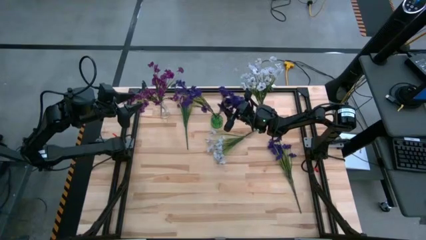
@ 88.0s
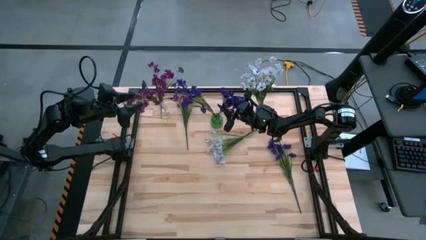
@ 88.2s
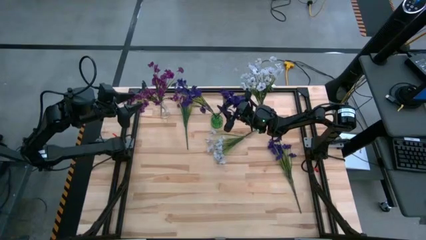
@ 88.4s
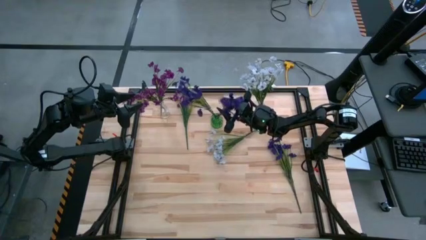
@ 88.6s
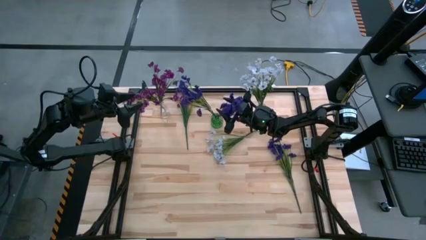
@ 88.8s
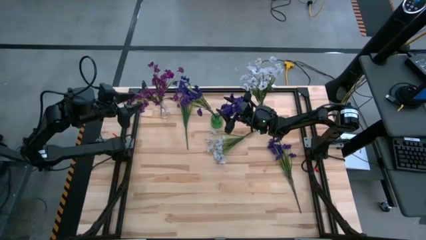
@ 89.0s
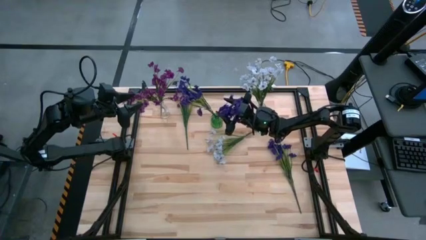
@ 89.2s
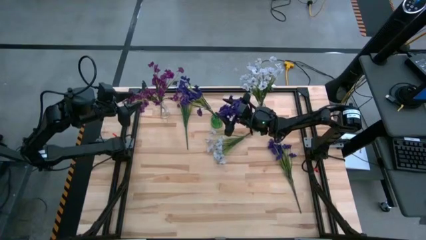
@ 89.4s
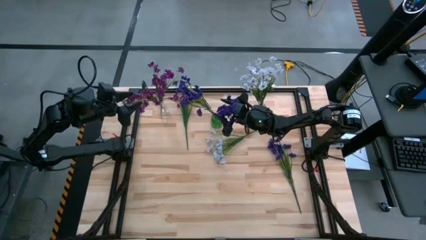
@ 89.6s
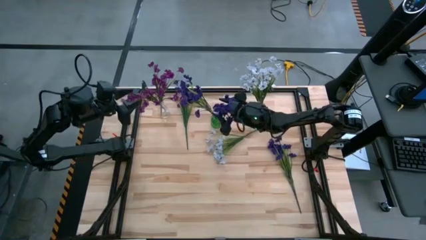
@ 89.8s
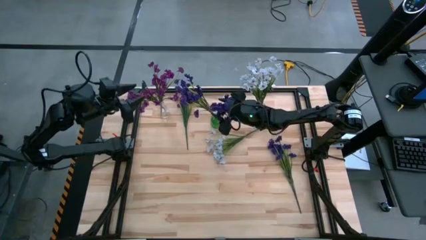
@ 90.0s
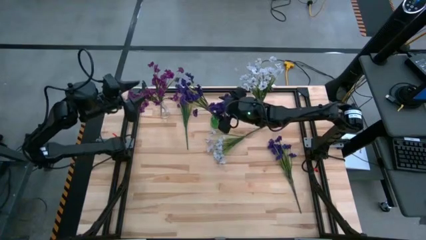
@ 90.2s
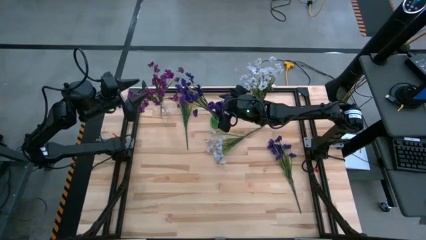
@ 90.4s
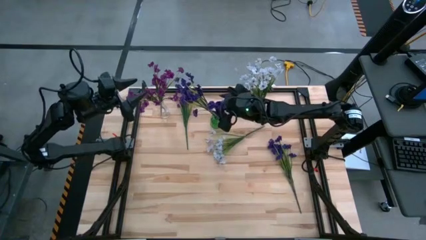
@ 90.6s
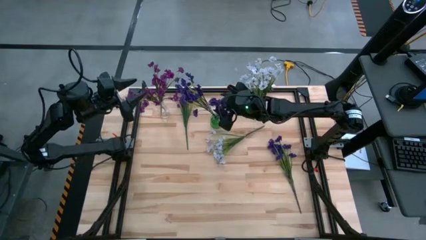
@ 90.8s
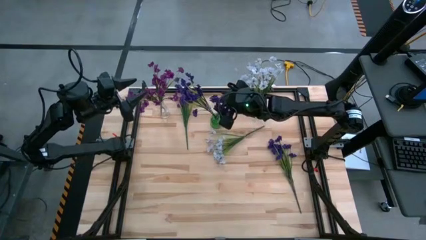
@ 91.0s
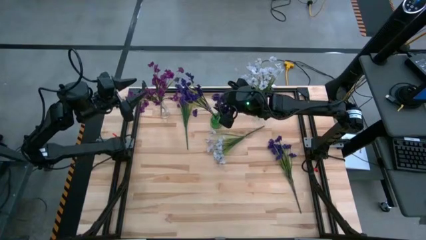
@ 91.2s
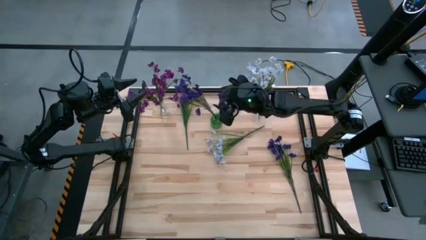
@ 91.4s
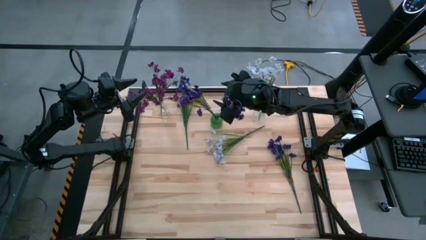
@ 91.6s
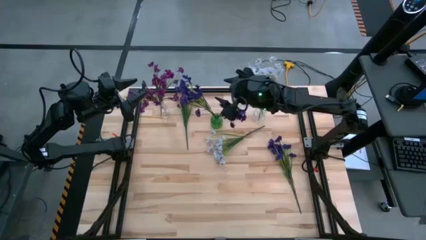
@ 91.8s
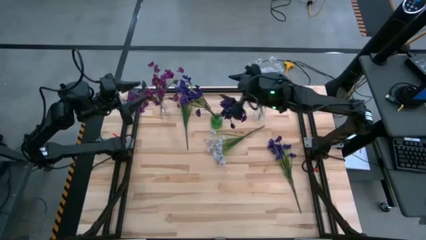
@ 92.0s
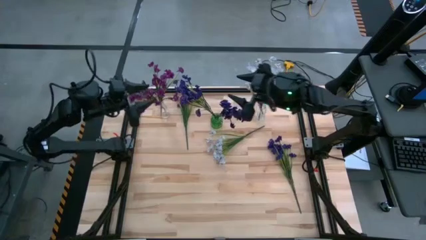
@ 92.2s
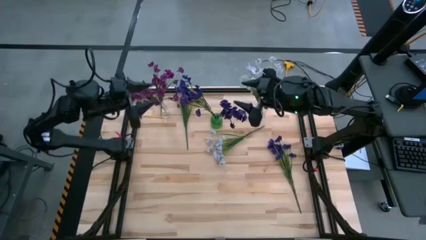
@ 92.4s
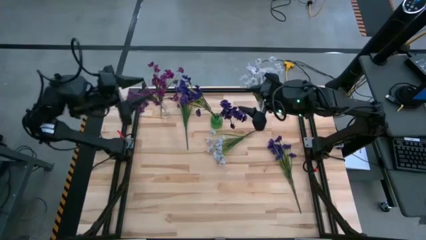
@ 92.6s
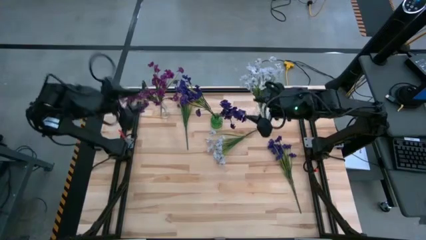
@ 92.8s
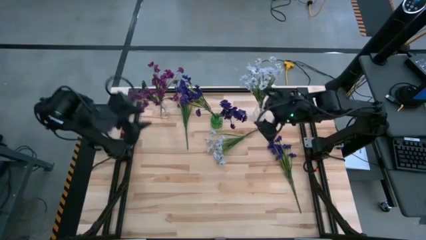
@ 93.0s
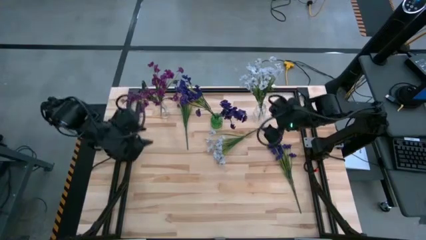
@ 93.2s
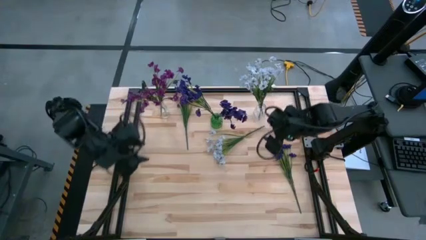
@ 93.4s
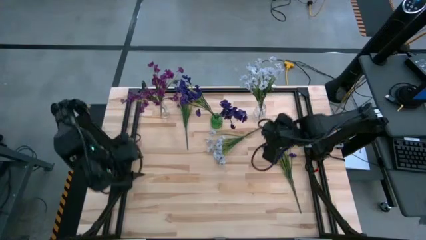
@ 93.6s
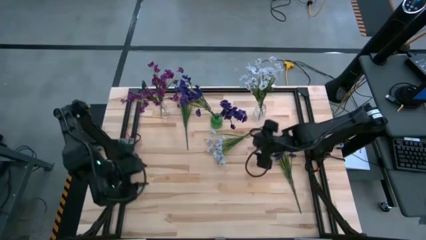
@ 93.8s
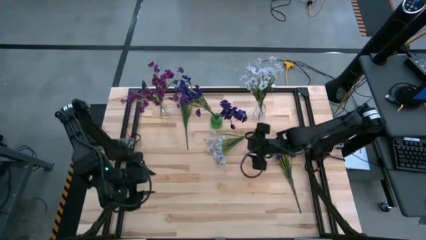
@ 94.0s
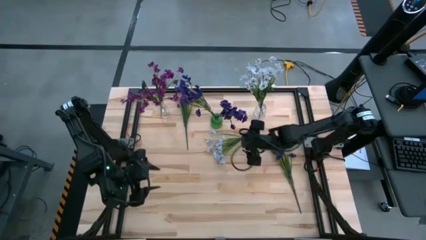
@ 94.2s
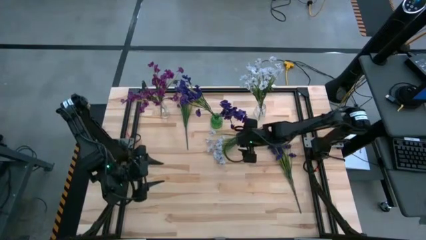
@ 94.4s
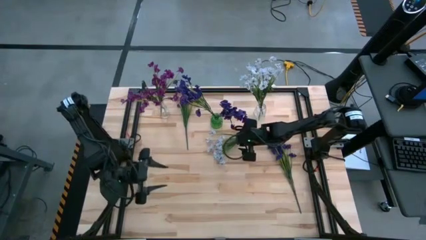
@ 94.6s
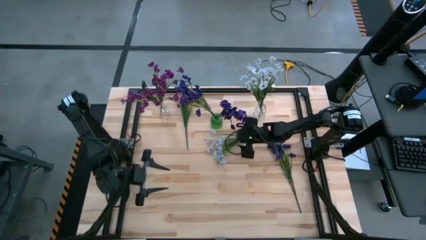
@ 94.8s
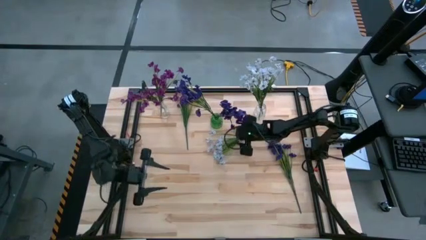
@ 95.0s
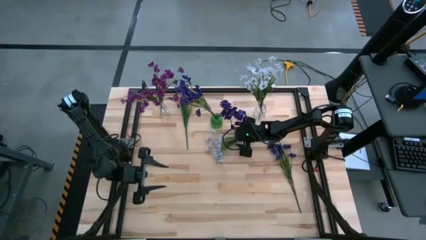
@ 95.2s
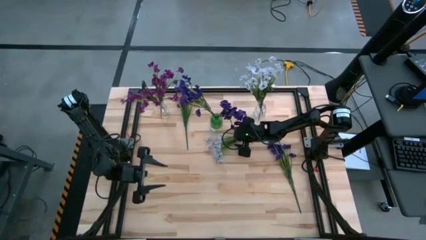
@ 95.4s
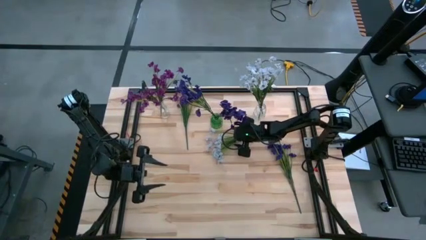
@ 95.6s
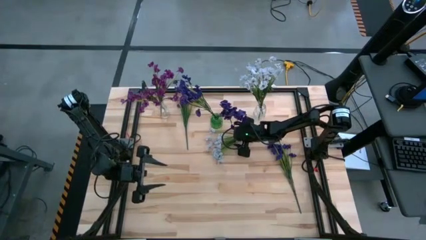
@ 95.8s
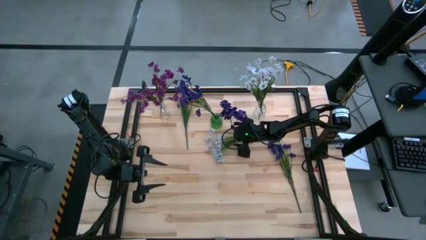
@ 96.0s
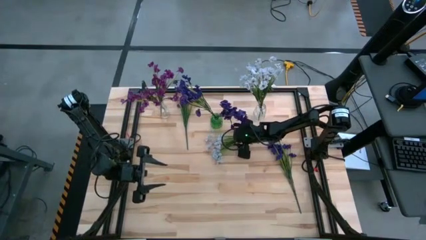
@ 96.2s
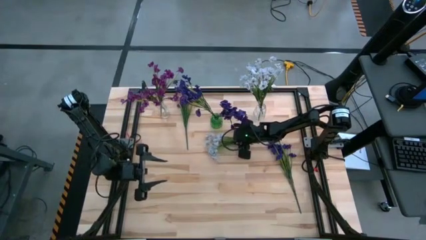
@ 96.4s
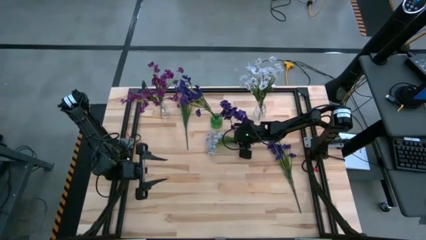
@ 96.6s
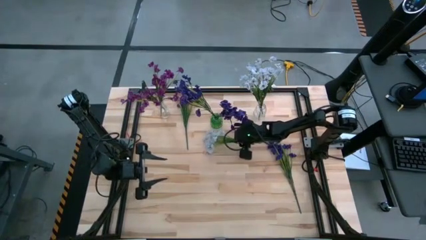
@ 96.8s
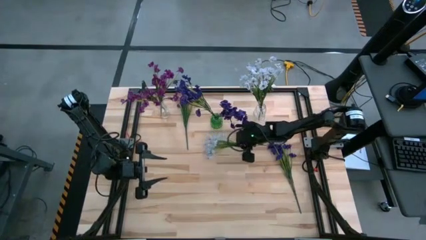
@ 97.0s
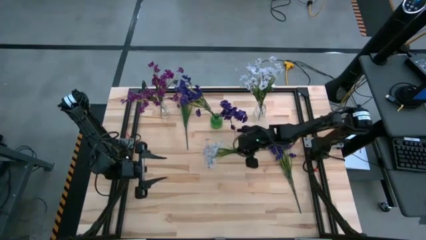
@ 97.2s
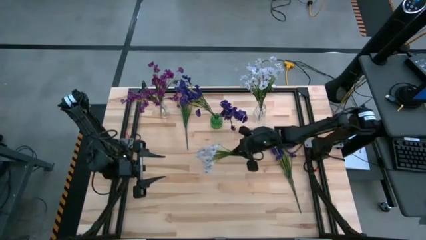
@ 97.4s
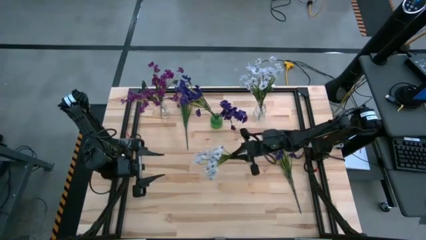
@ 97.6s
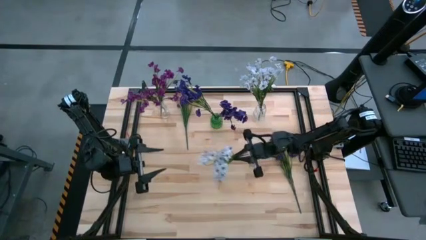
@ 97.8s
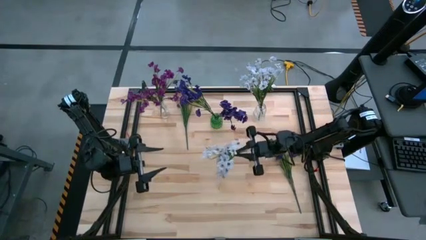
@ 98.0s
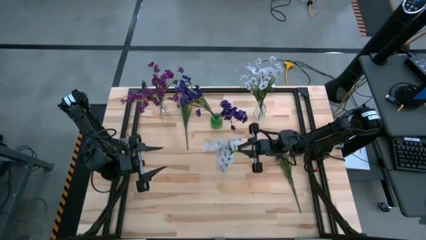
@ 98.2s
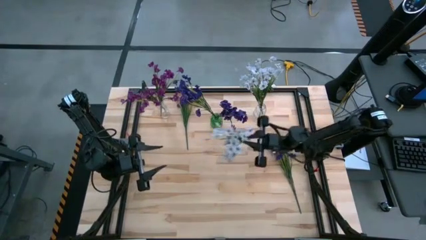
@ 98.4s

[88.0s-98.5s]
Task: Sort flowers into vase by color
Put the white flowers into the right transparent flower vase
